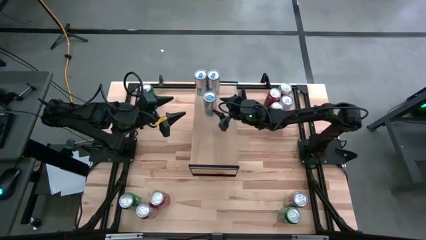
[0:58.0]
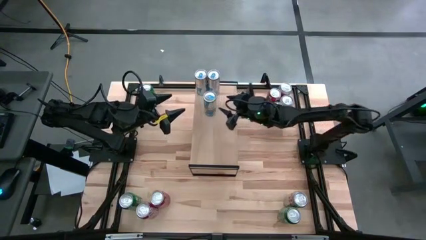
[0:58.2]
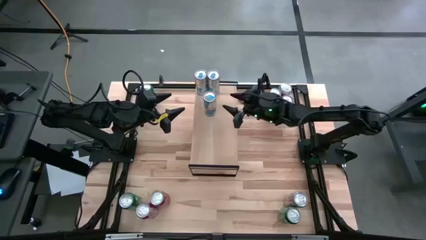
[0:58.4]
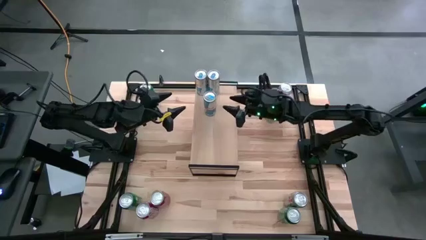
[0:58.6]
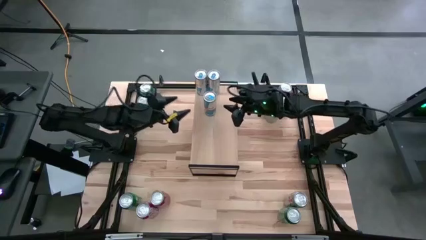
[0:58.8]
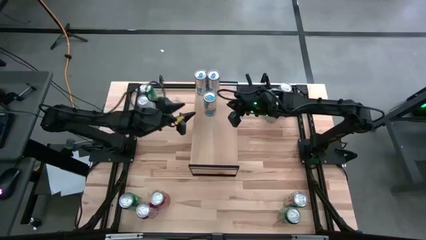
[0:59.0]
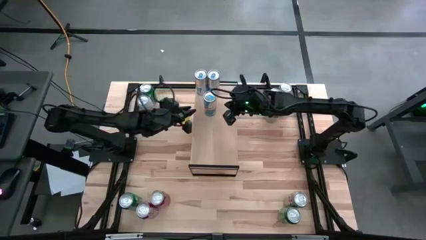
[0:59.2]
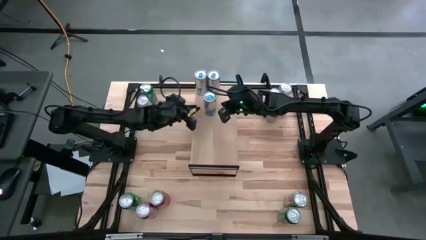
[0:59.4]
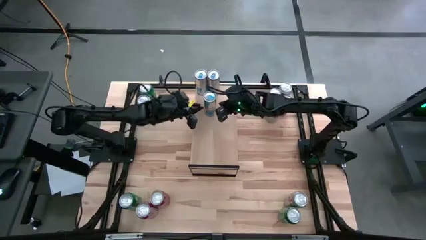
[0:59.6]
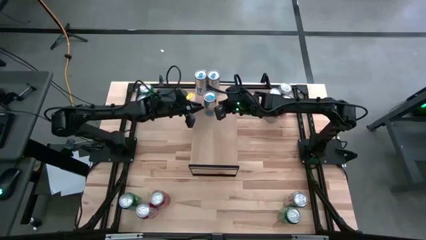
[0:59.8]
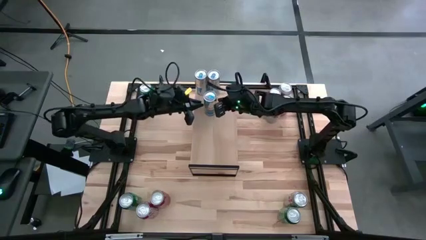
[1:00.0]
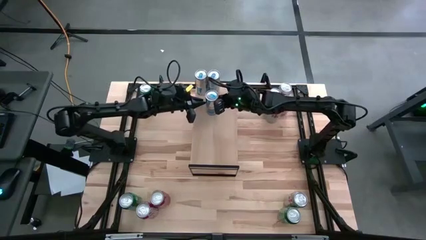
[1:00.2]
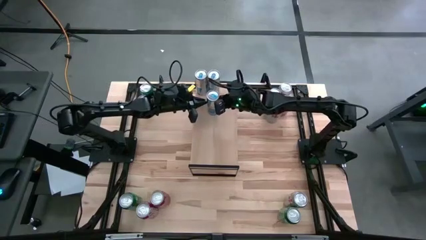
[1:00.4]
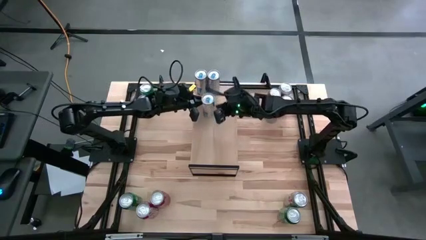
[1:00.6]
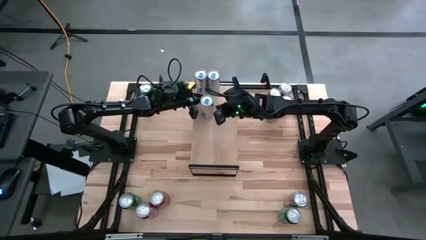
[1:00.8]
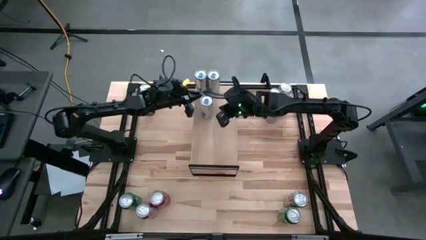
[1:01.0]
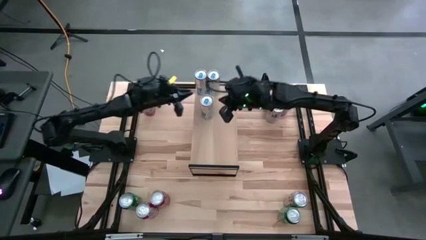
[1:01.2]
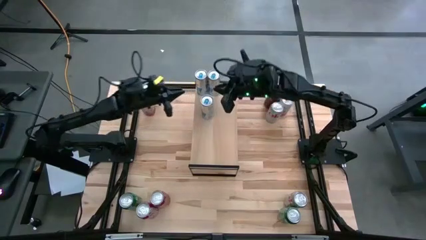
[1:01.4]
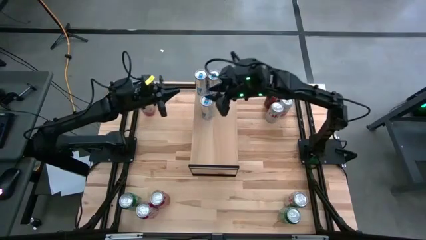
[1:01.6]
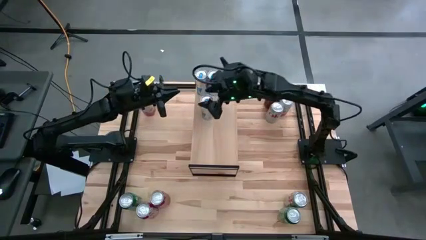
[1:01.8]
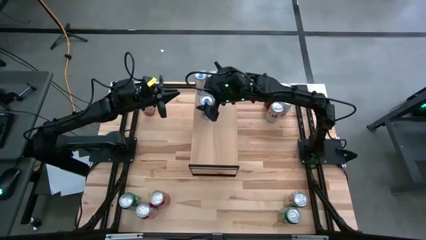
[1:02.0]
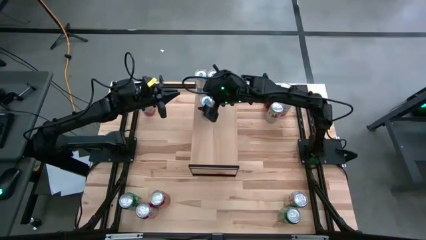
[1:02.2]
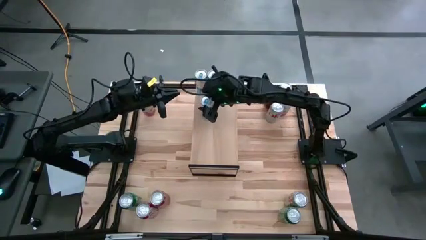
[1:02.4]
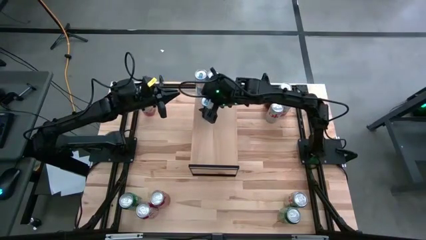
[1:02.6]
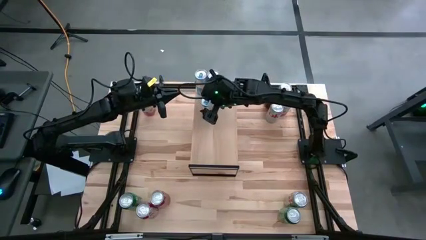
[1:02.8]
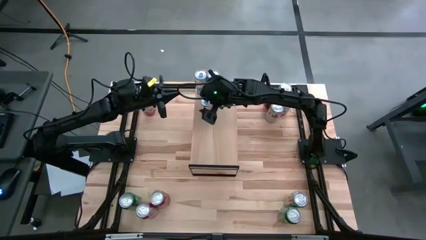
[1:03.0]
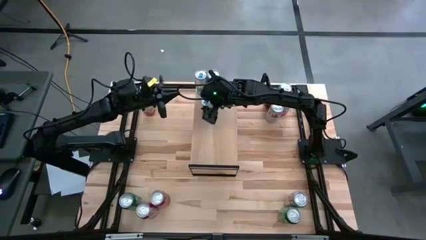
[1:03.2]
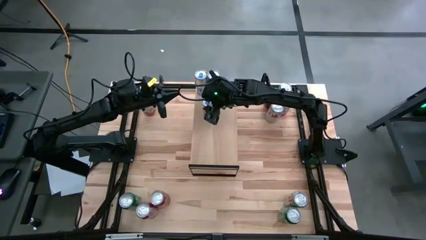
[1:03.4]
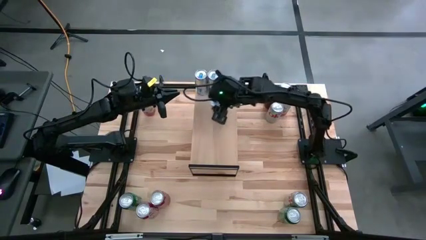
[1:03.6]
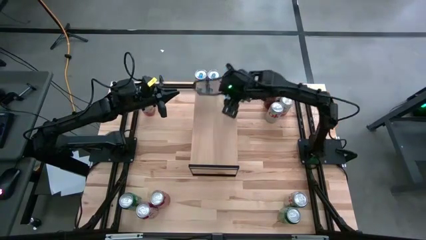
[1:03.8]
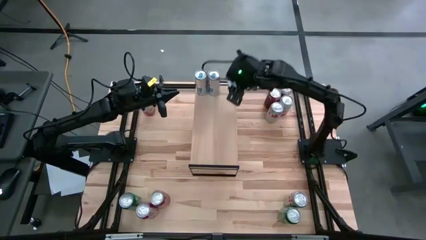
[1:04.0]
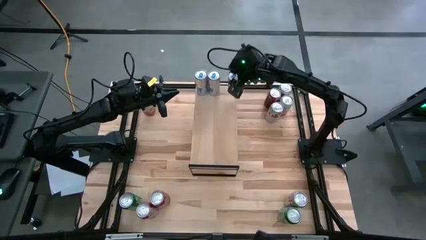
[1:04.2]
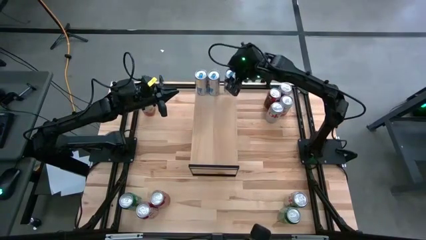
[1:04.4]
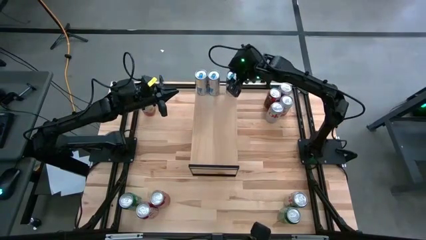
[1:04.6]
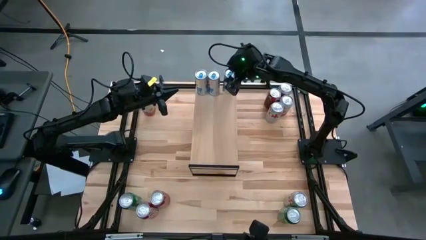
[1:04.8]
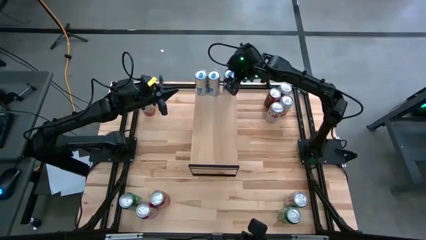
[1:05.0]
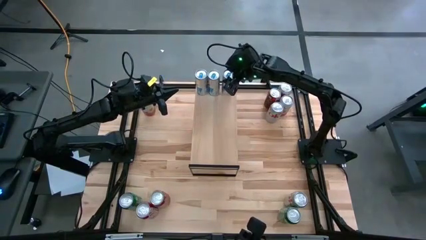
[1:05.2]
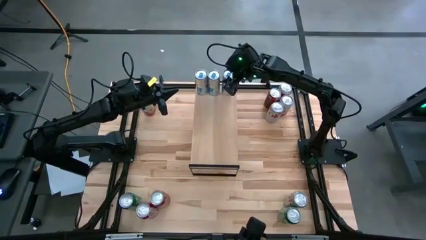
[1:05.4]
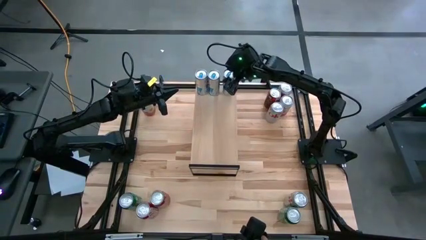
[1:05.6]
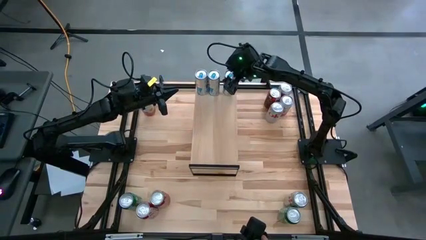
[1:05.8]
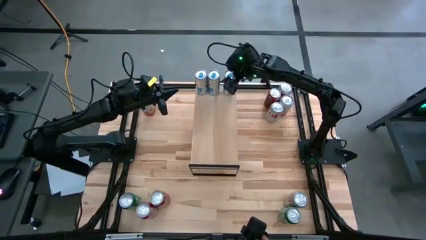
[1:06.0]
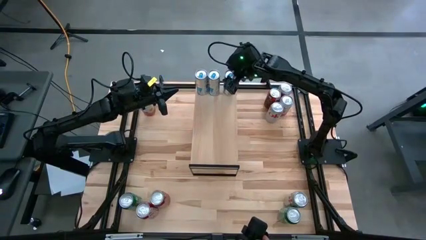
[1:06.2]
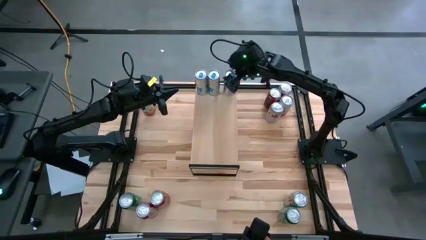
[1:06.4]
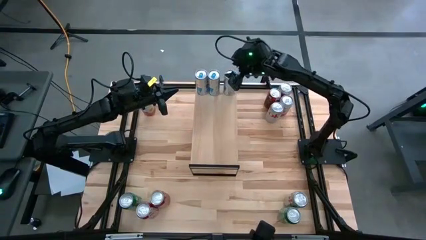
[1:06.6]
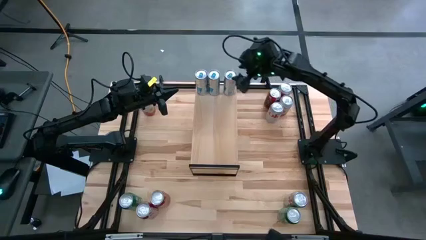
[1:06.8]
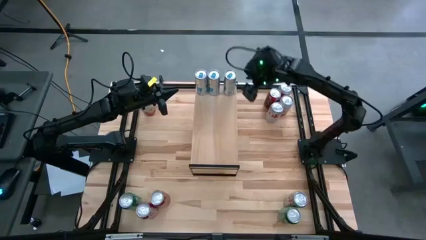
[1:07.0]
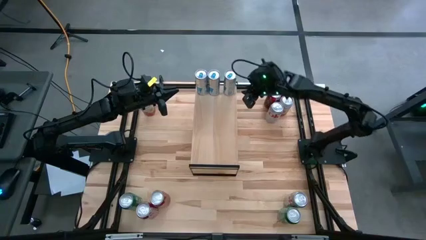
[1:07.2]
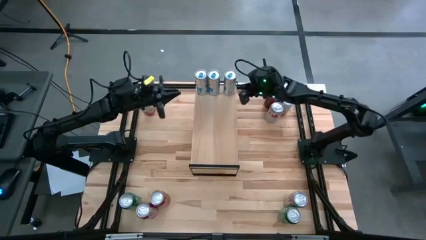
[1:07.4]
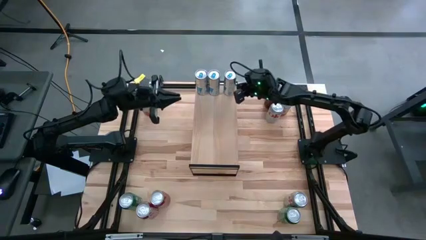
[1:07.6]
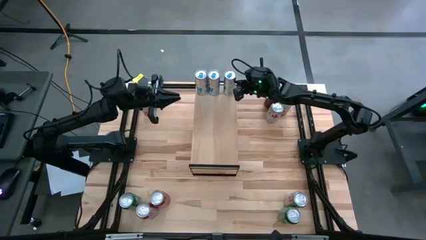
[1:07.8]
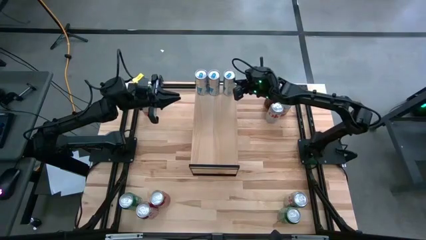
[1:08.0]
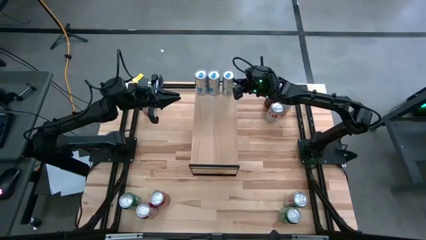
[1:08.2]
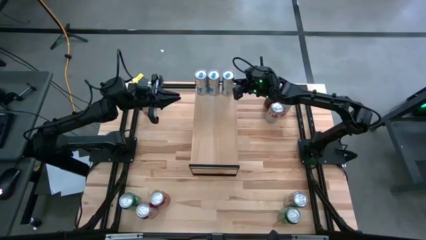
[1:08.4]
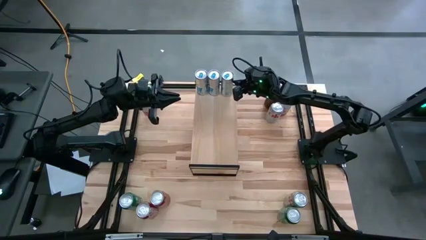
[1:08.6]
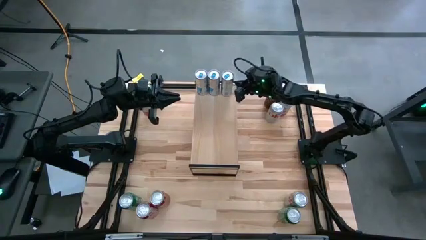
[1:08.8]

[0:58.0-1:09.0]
Task: Place canned beverage on shelf
Put the blue soda can on the shelf
